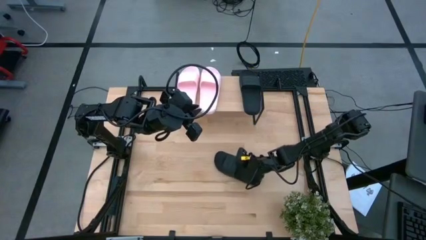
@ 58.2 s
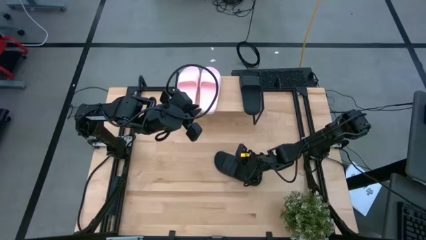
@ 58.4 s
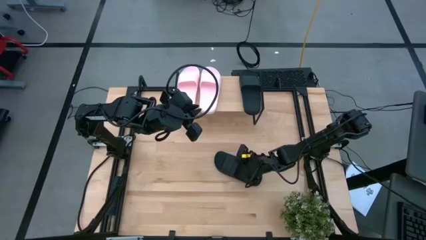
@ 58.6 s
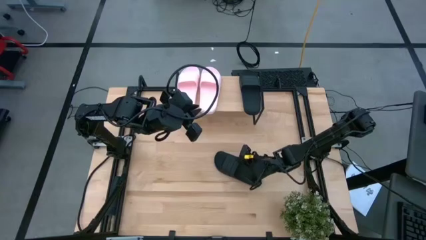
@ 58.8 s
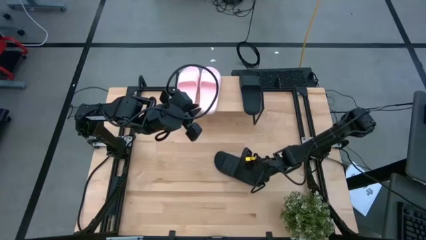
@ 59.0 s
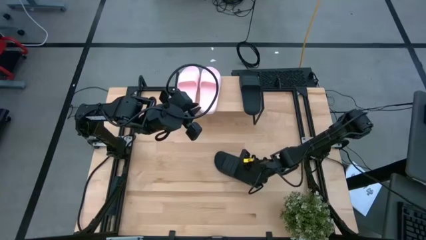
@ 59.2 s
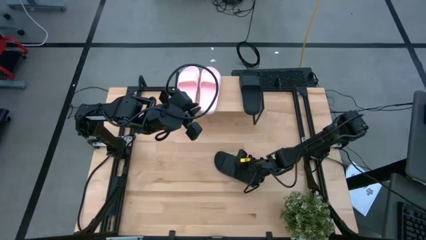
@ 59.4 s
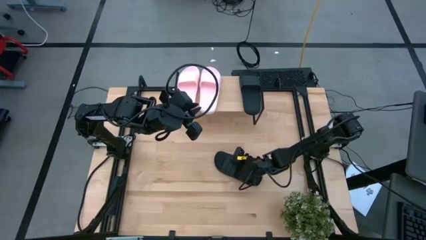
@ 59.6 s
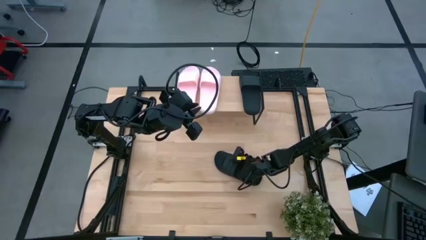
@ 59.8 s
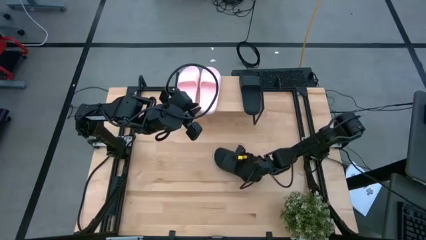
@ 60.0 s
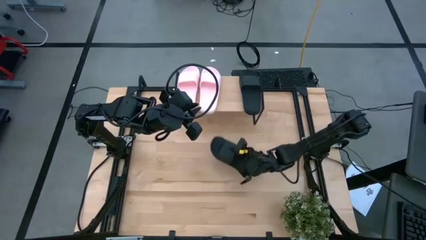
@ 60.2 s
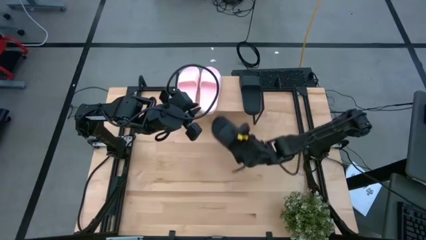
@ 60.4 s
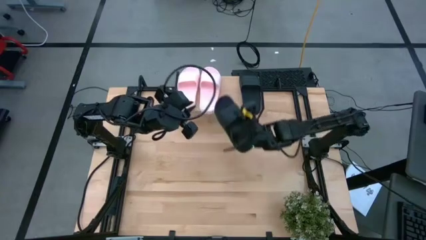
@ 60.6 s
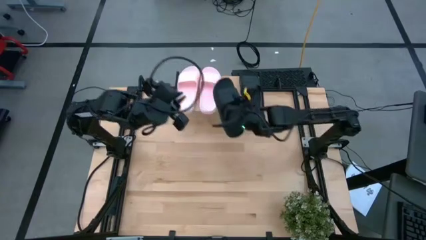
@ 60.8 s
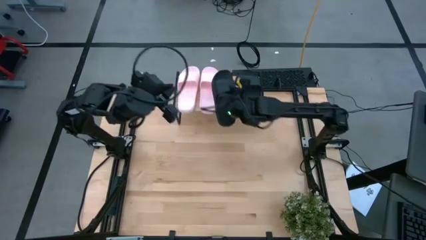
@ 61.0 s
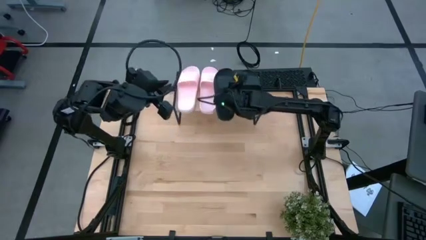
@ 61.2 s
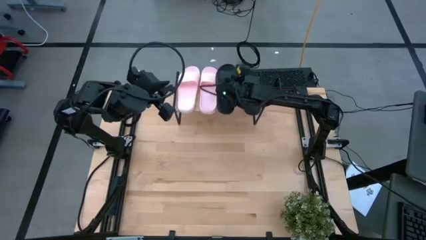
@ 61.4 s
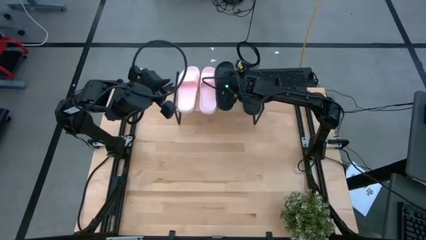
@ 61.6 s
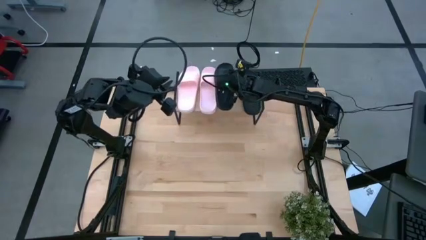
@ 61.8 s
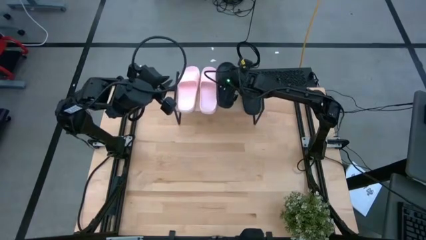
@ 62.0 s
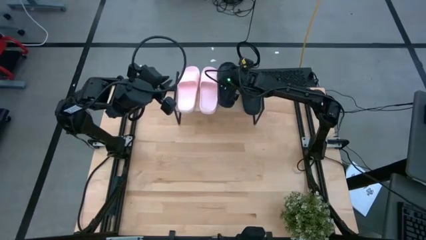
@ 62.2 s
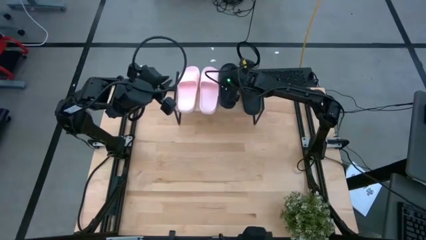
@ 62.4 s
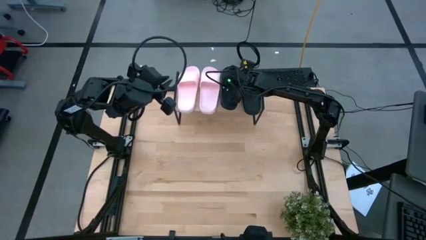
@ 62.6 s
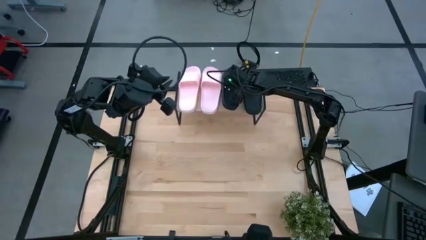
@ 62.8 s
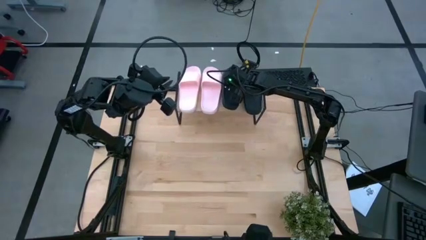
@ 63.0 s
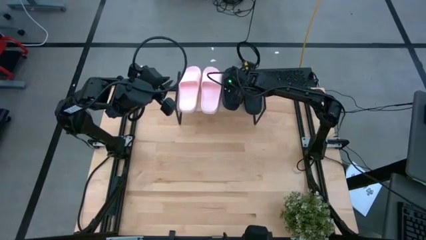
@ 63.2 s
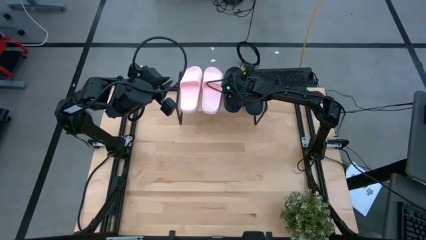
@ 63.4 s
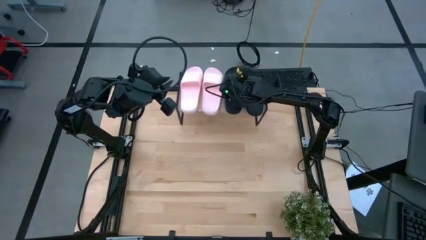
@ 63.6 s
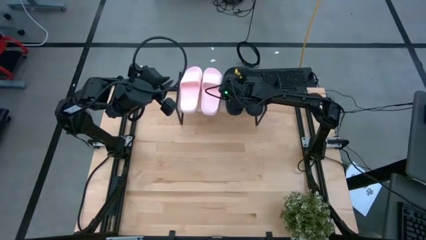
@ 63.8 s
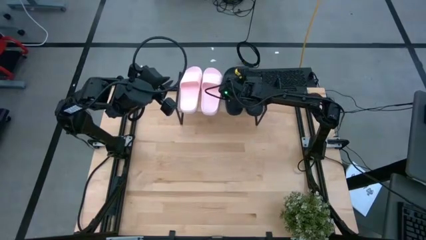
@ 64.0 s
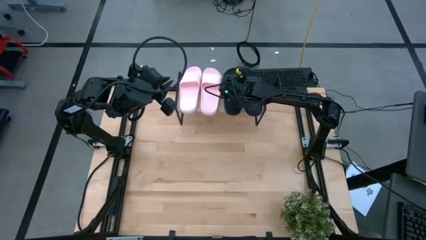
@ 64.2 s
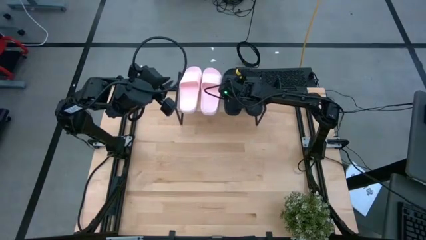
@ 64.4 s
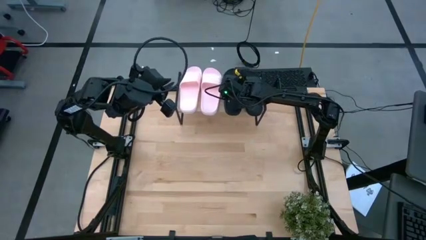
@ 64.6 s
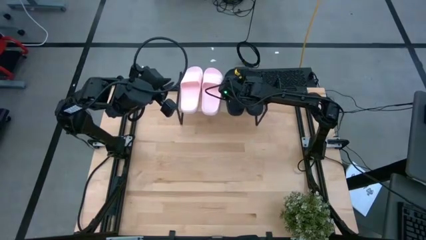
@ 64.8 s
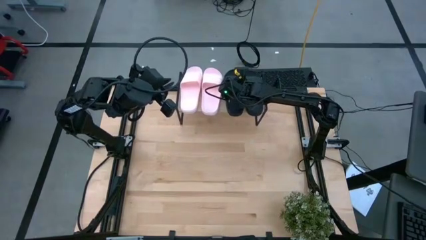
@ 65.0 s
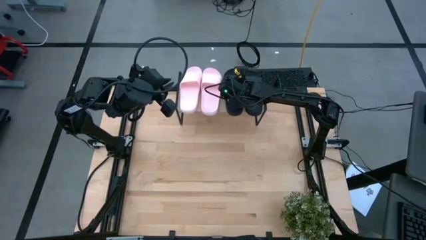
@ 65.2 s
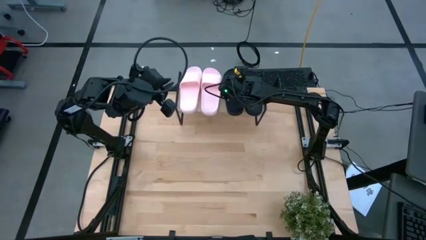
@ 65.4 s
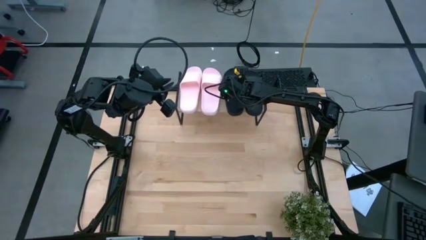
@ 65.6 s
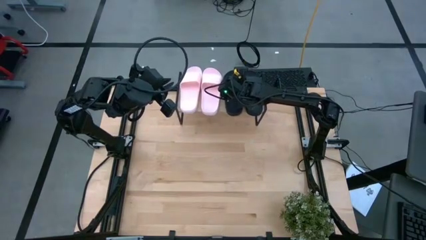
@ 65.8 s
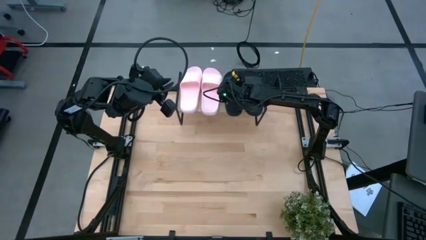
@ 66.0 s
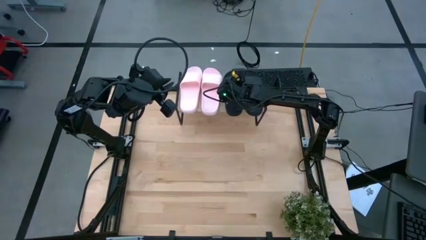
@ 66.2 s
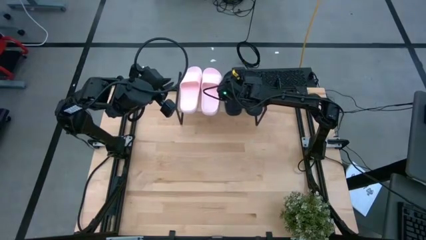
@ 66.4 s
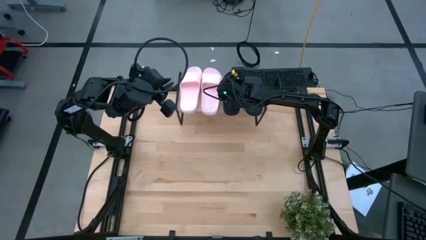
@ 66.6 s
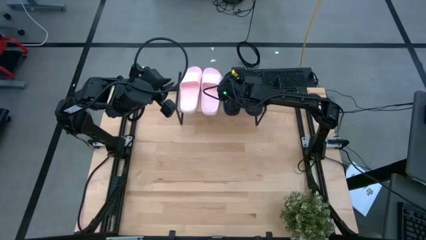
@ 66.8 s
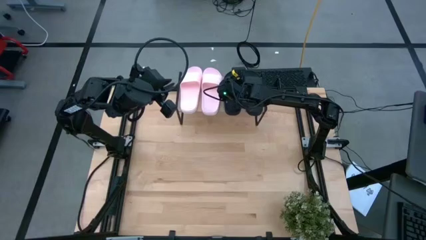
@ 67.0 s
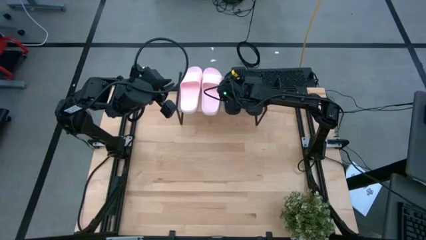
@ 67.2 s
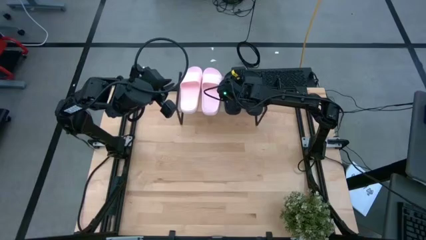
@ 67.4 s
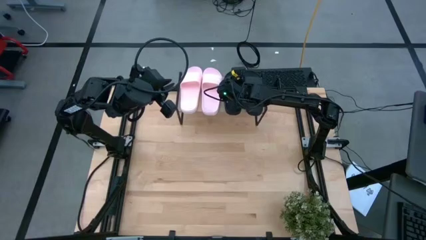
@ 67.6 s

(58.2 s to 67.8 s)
Task: Pick and place slides into the shelf
Put the black slides on the shelf

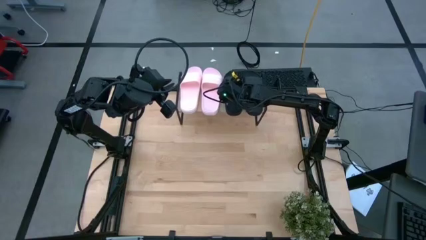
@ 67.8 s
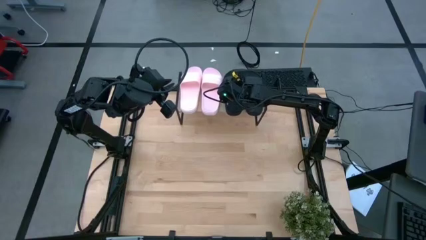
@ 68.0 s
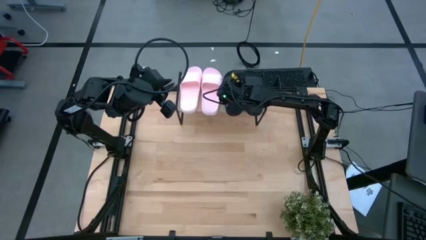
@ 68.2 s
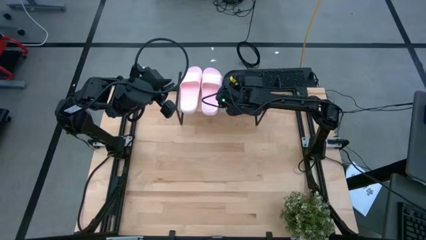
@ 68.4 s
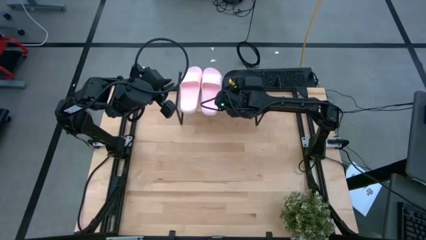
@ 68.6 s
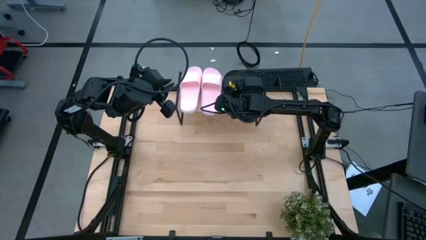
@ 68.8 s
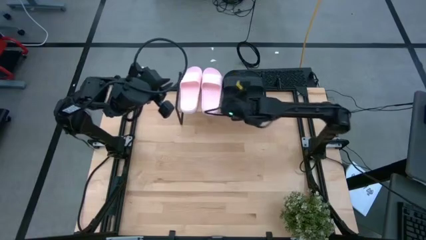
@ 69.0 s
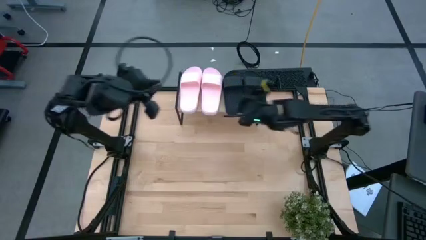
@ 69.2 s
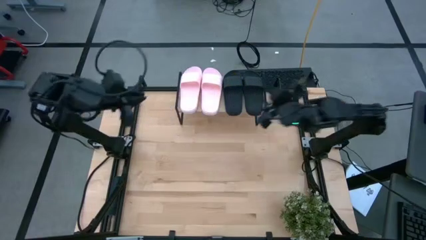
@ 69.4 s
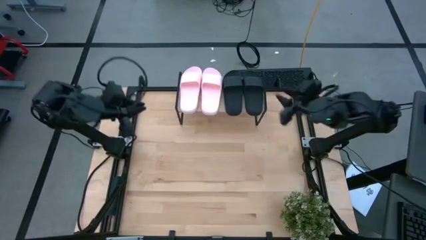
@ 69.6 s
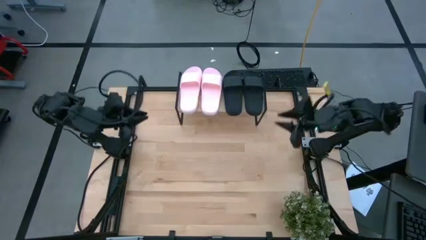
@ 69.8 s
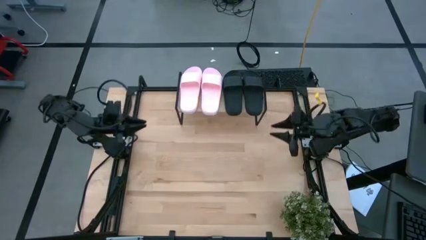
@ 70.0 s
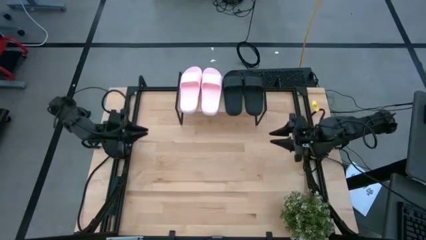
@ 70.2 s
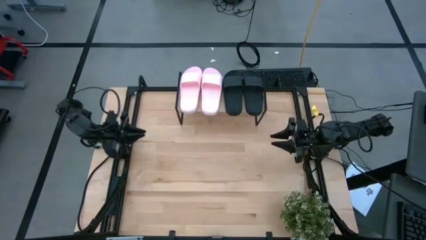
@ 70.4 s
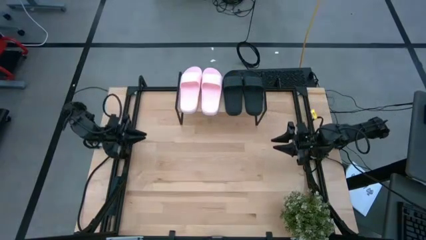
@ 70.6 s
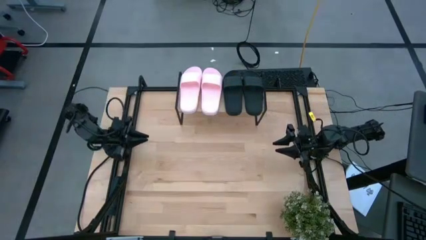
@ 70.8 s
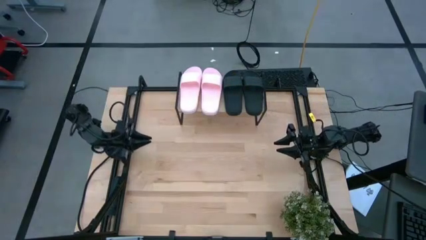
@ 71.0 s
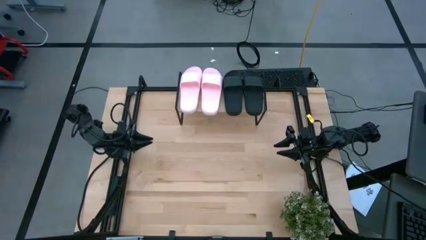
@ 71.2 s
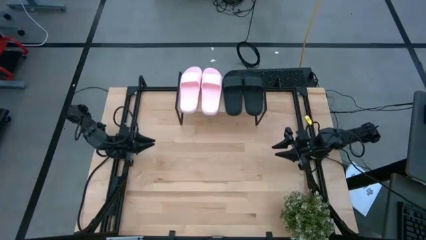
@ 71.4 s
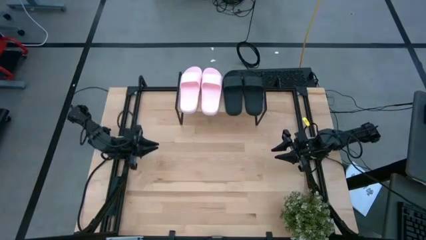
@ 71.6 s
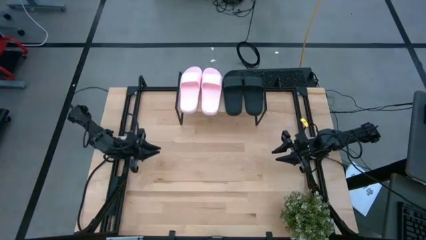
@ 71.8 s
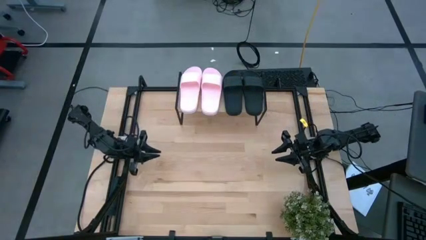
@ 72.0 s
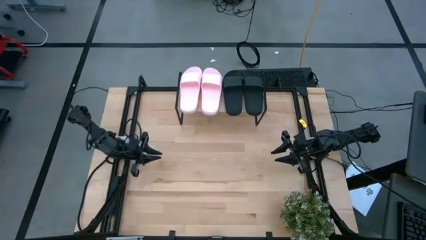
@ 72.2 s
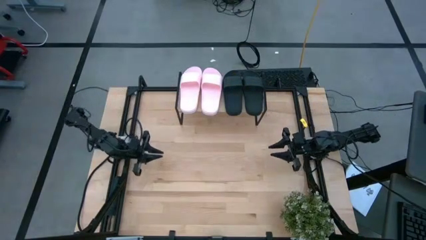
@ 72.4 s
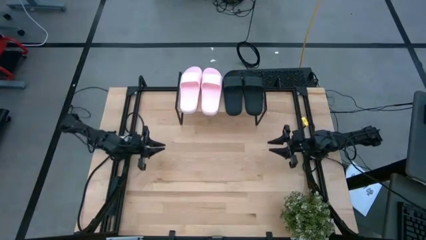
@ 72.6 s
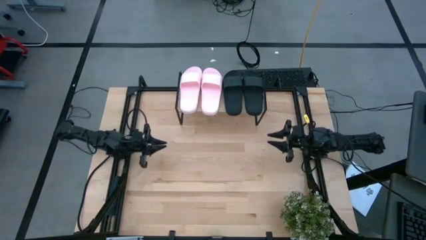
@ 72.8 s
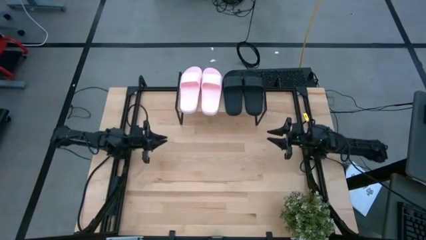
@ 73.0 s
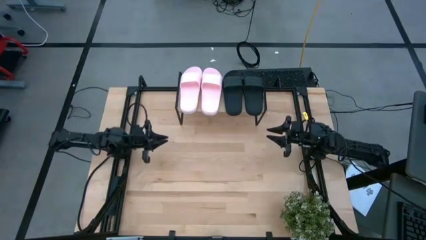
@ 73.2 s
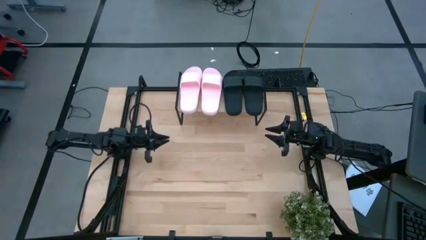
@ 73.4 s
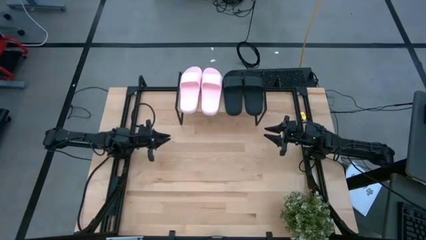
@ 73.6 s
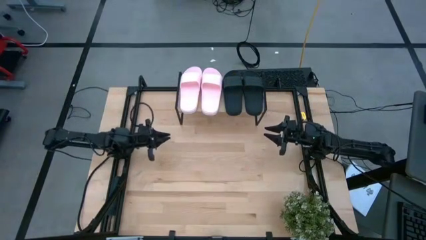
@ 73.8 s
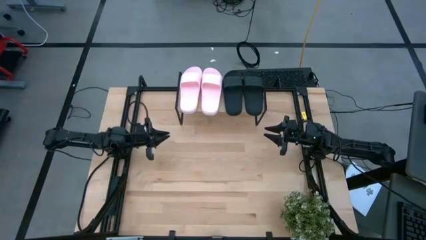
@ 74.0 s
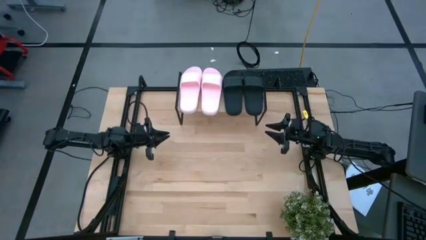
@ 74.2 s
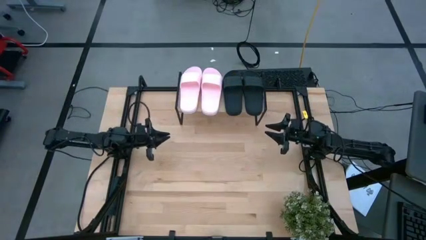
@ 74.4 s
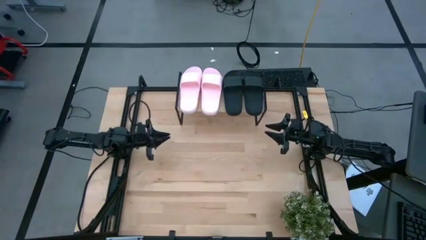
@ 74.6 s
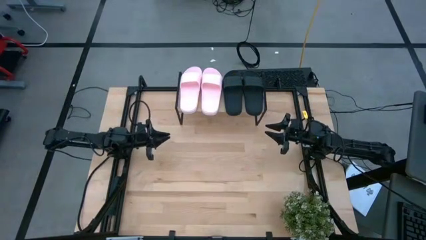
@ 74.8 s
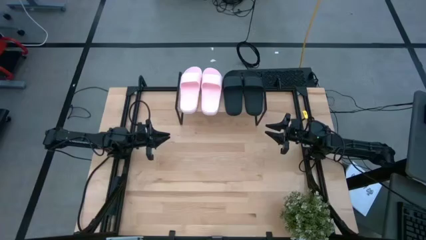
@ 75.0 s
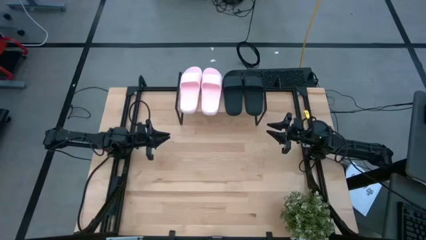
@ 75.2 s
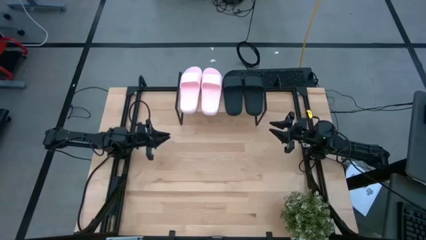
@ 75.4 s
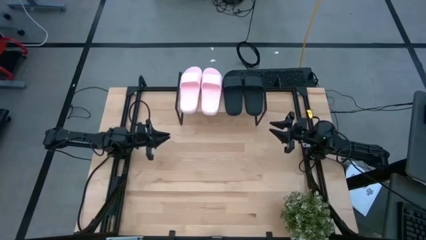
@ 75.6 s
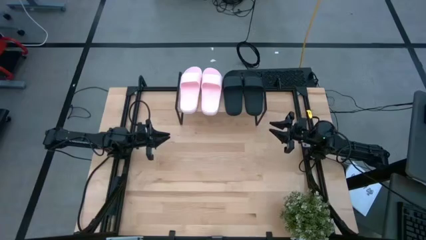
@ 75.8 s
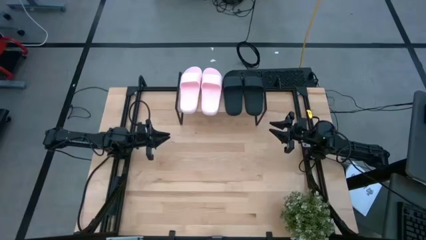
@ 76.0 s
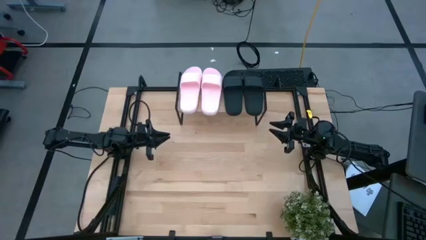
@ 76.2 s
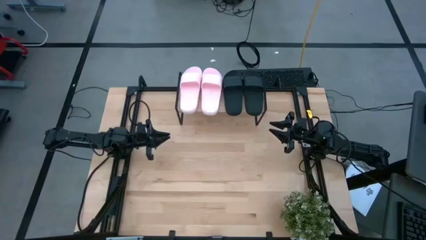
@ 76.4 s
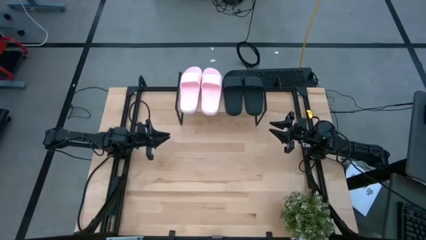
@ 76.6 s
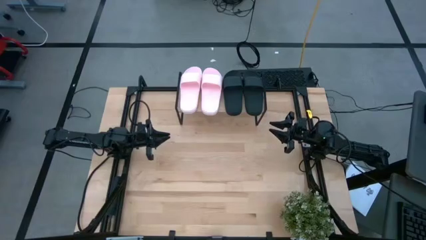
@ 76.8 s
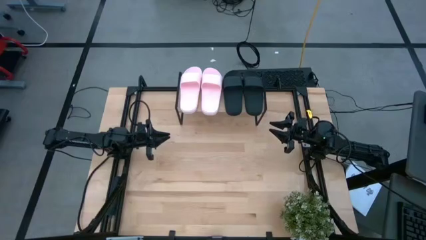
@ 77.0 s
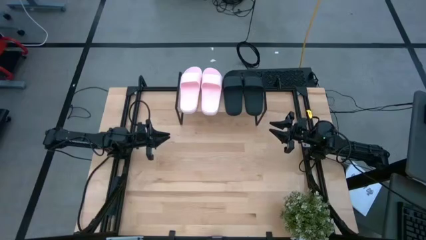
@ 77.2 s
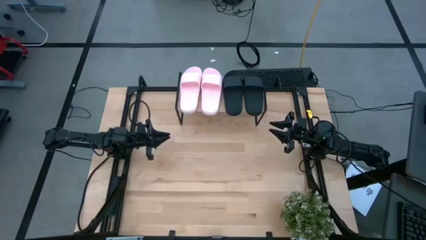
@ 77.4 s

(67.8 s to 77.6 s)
Return to Home Position
